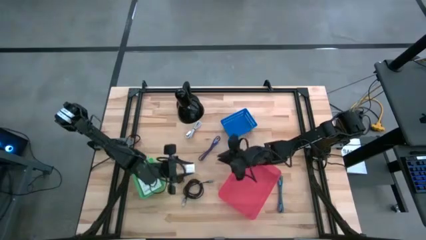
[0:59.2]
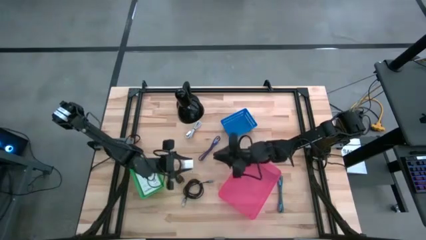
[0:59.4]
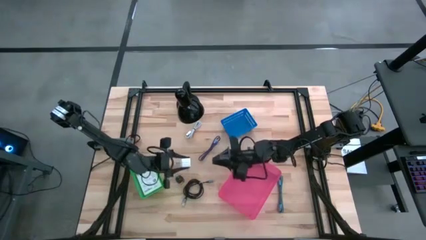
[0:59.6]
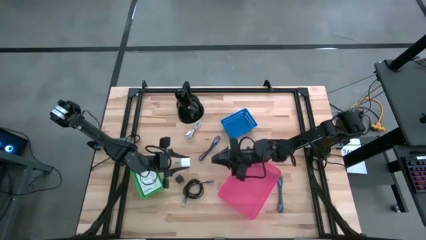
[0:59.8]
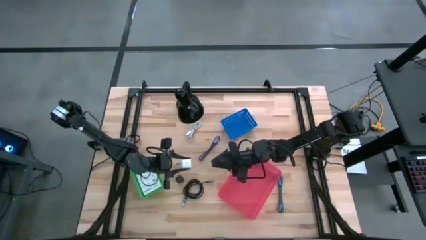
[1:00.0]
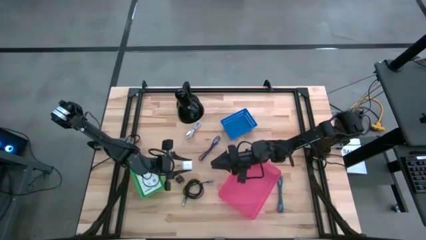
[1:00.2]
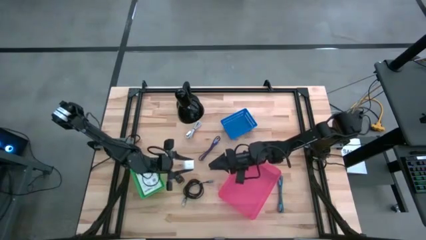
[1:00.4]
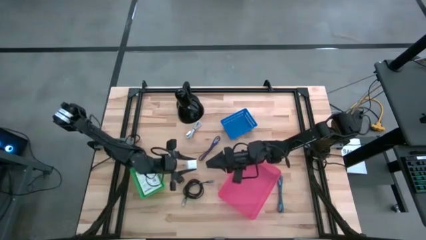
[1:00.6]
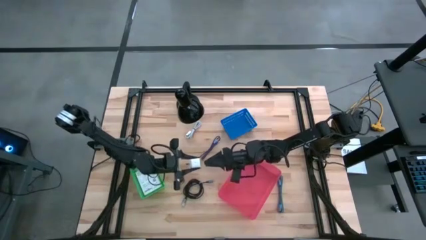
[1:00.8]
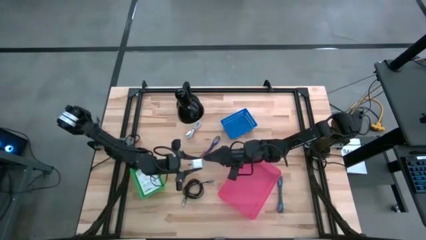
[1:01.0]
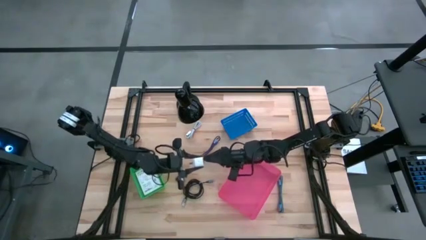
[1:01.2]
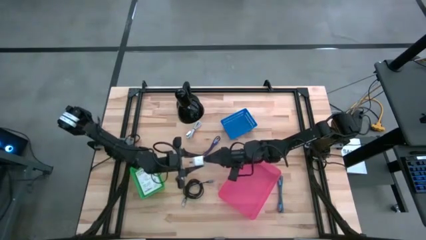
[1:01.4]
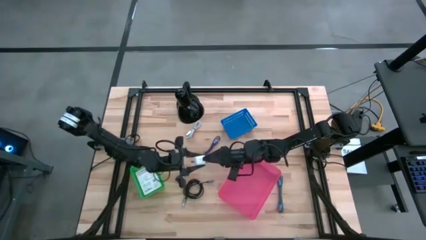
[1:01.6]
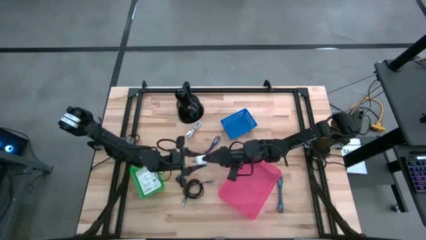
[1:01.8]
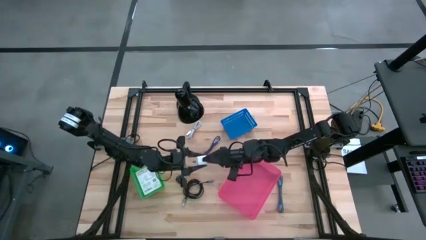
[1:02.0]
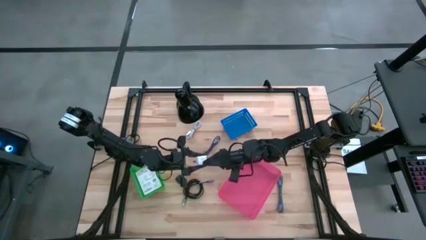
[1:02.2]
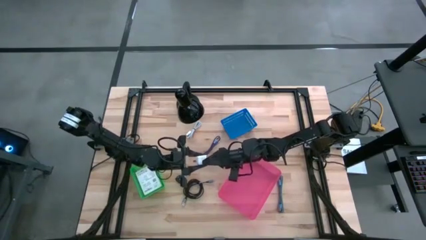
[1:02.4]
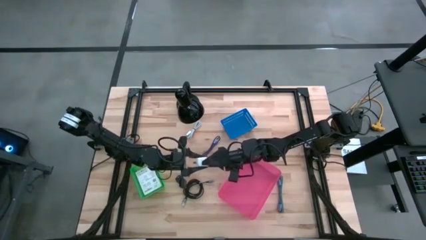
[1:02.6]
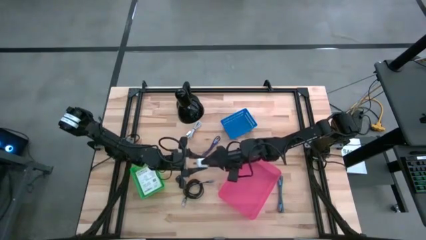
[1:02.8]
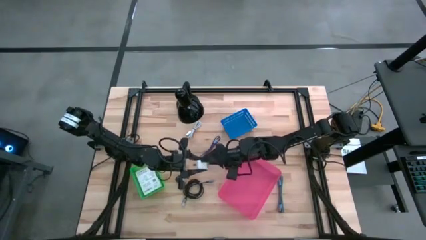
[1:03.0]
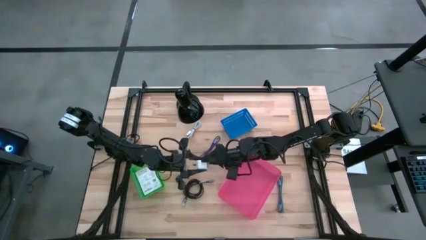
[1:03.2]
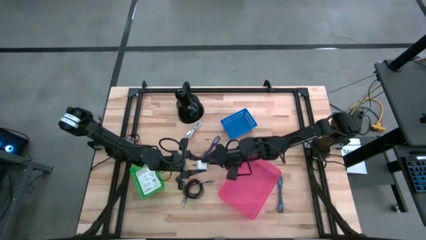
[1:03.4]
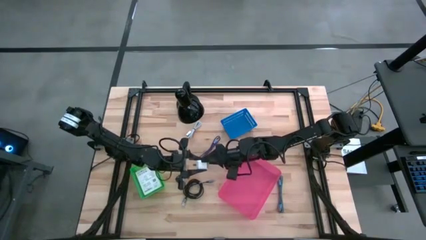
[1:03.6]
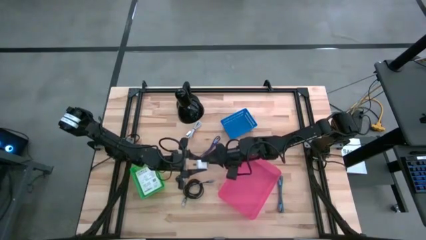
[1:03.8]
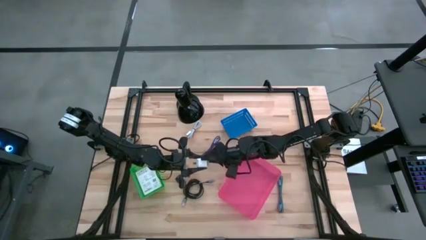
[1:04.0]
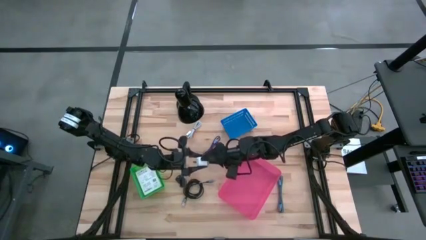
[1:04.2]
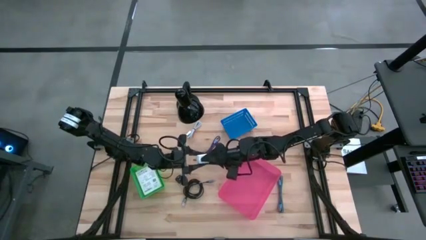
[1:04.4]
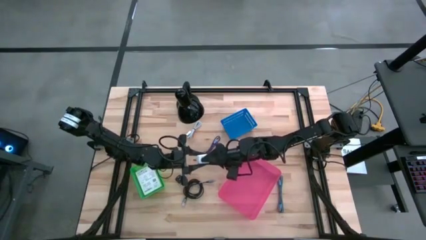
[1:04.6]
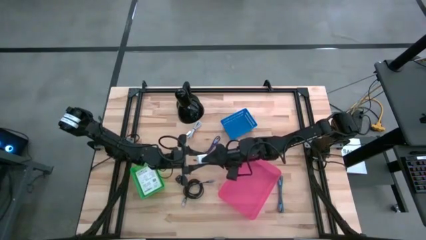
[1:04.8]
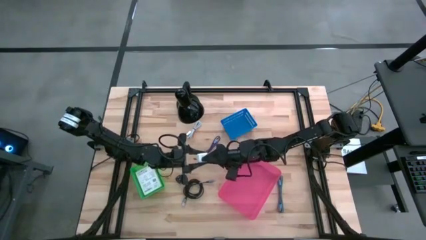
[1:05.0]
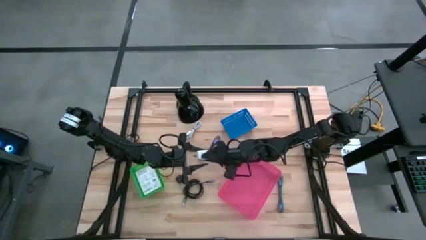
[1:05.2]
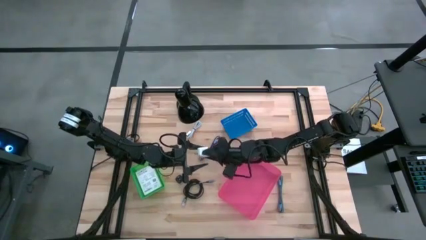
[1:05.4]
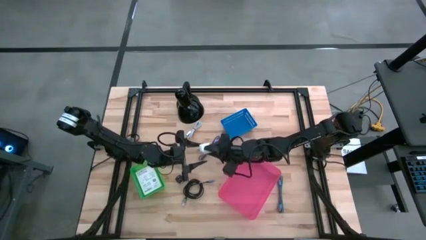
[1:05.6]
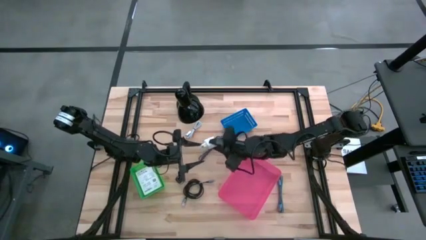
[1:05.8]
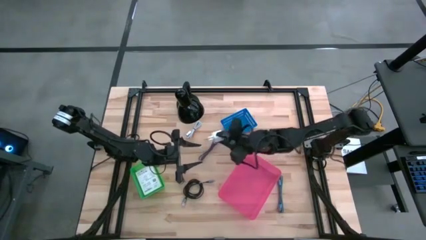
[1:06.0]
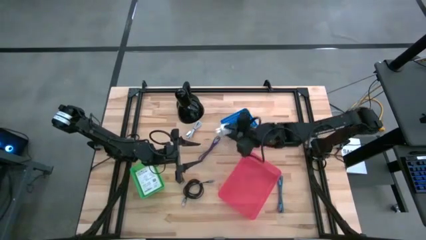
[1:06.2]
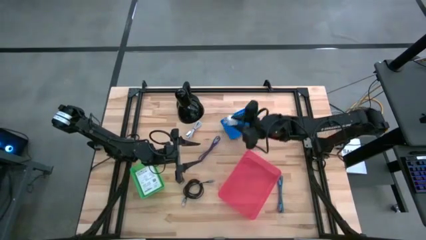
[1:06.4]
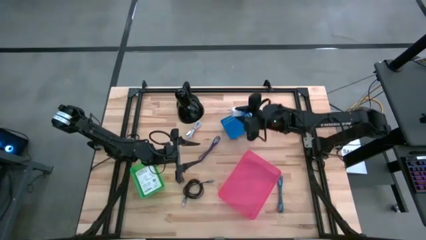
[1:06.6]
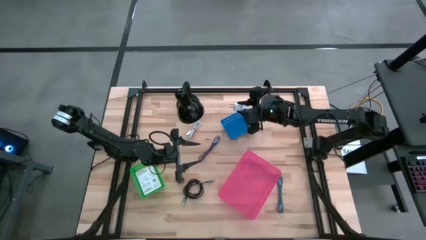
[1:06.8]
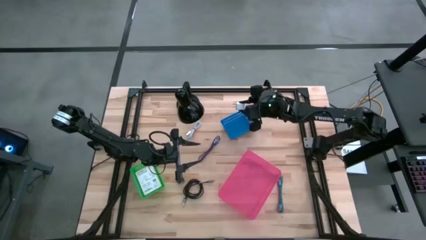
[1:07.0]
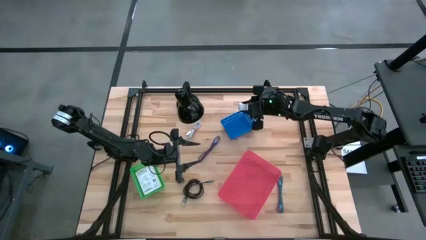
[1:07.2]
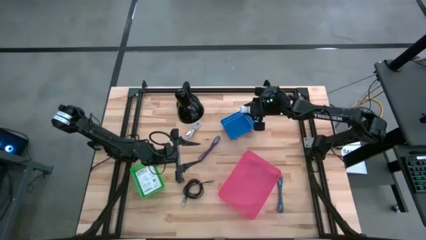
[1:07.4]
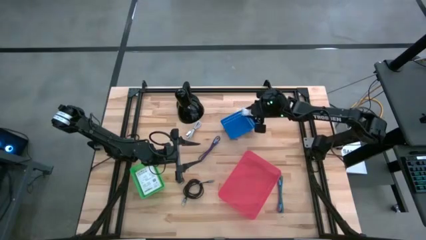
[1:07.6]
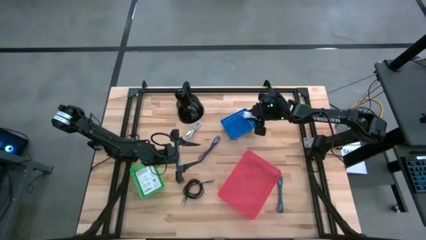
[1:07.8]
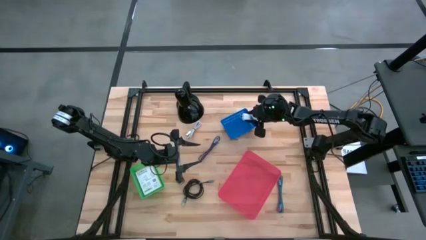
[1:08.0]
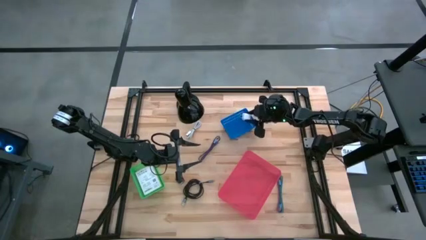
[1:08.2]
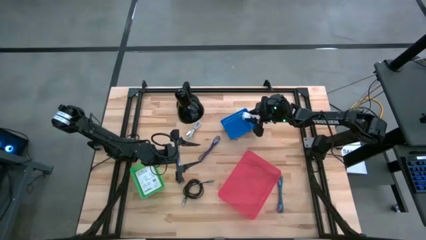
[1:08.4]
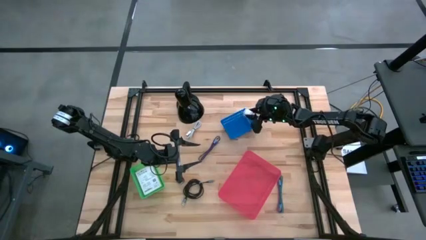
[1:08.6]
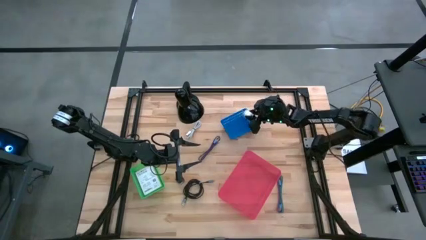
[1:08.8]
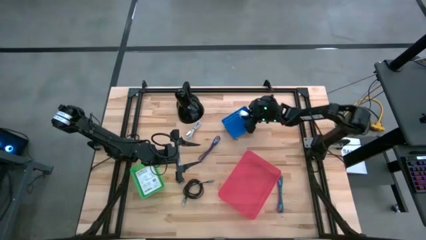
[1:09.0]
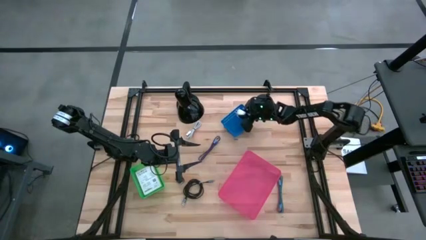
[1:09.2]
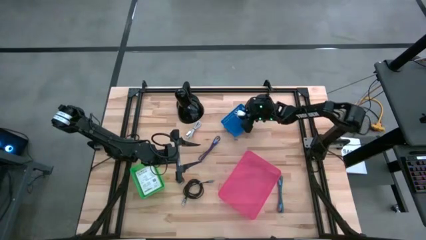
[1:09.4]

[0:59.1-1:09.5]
Task: Pick and place items into bin
Put the white charger adapter into the blue bin
